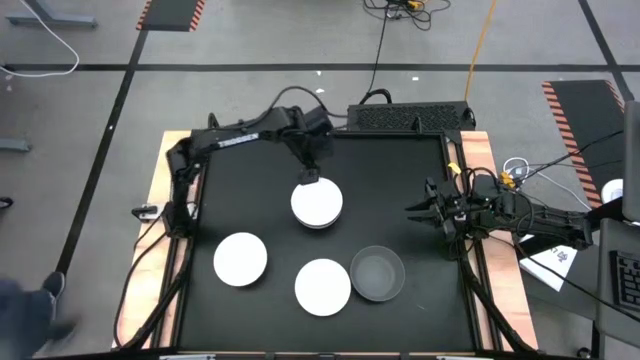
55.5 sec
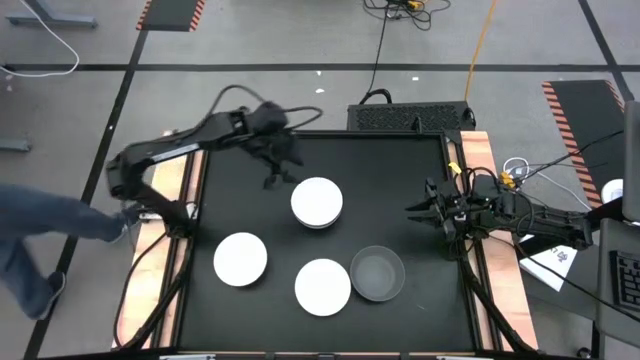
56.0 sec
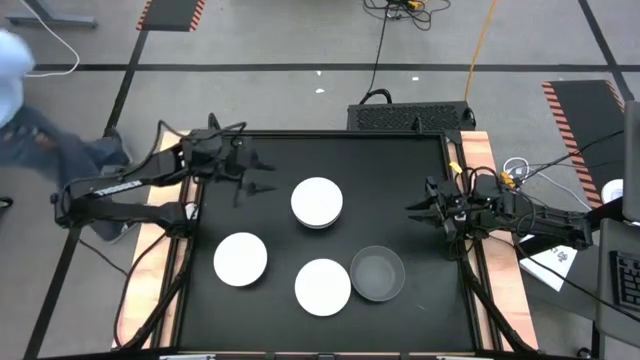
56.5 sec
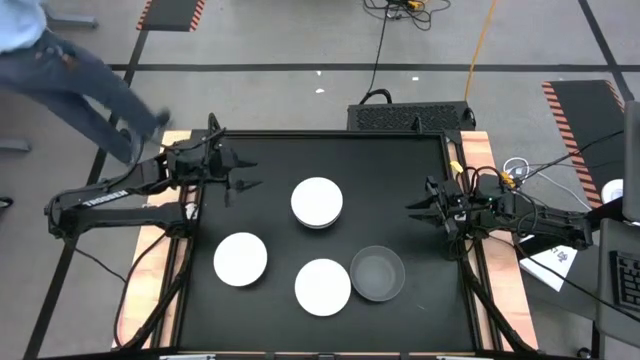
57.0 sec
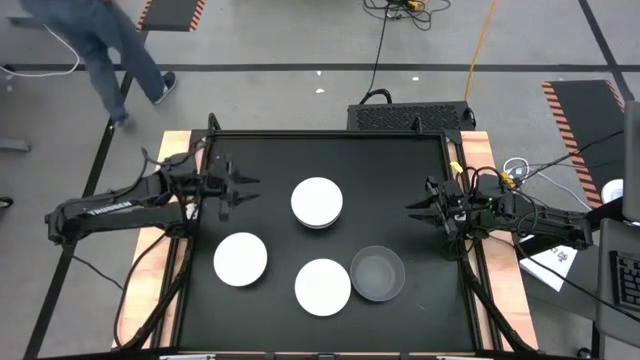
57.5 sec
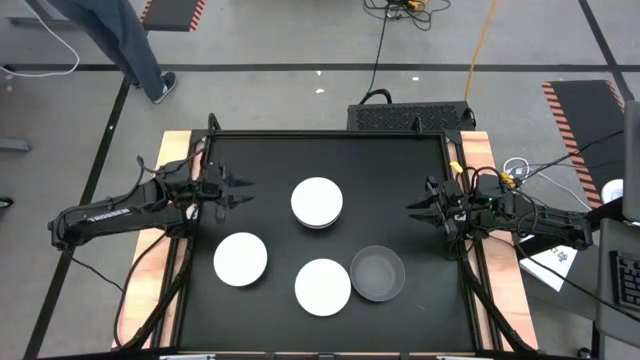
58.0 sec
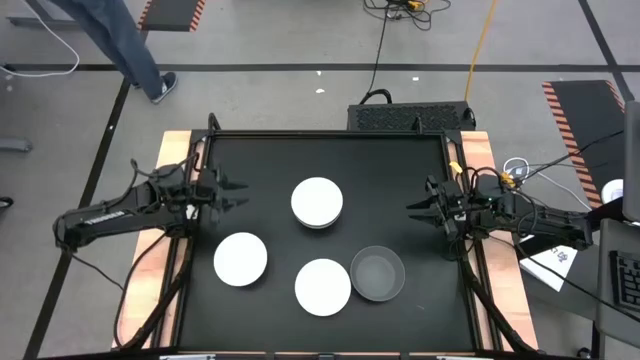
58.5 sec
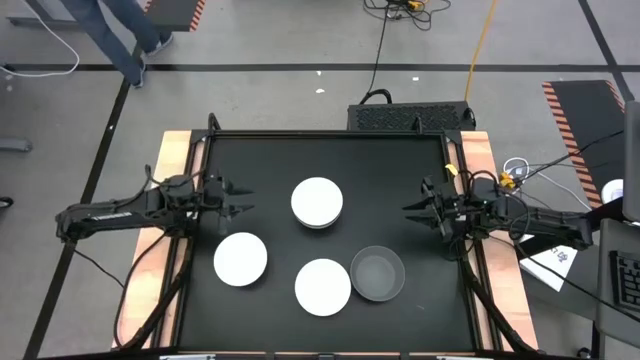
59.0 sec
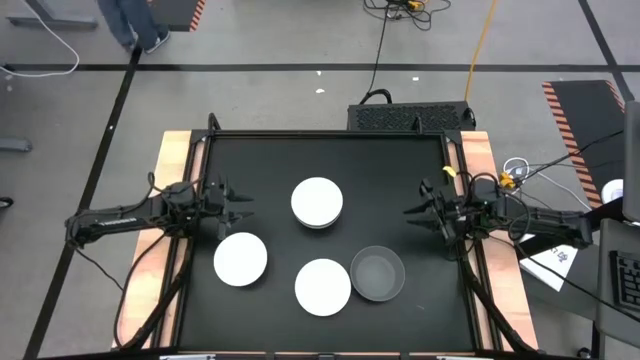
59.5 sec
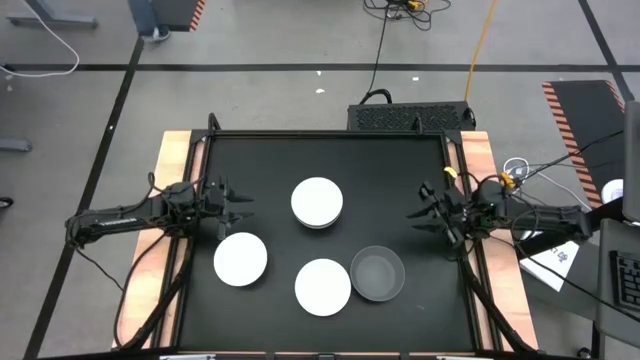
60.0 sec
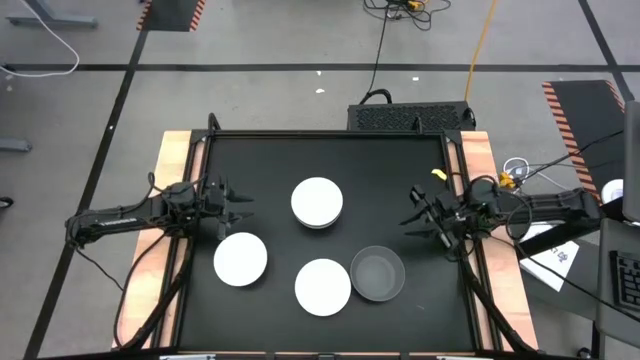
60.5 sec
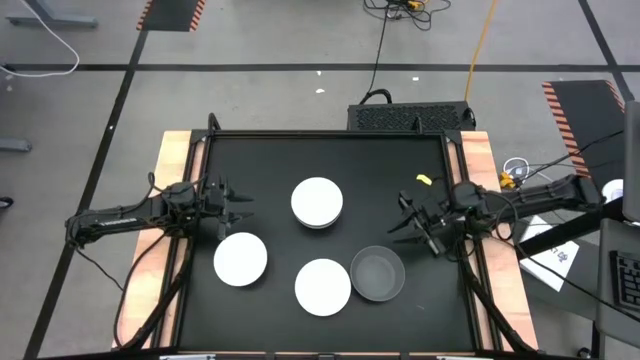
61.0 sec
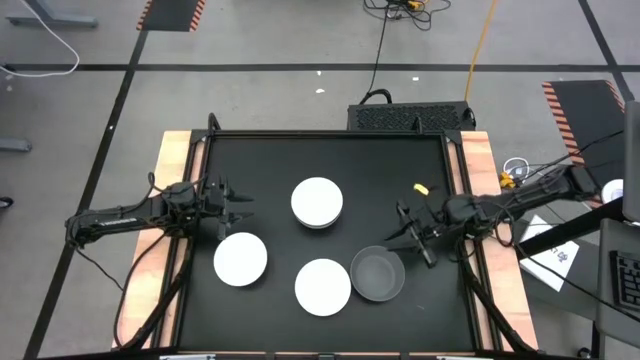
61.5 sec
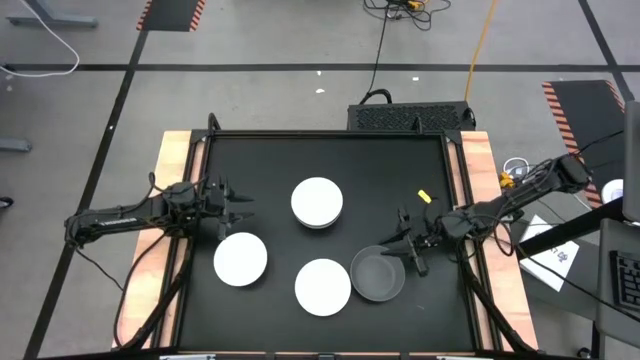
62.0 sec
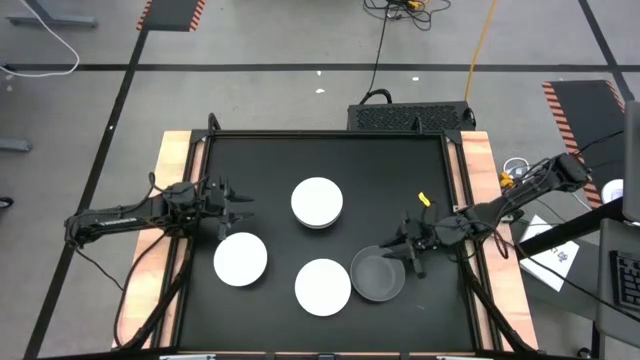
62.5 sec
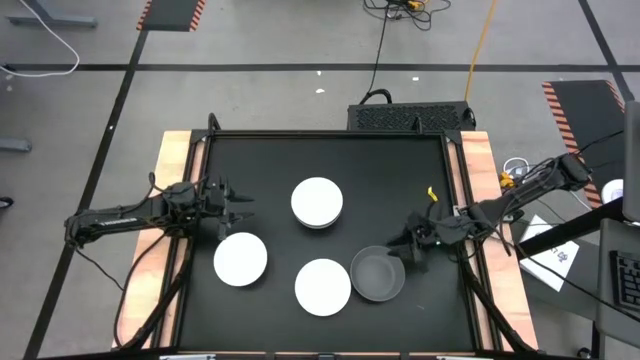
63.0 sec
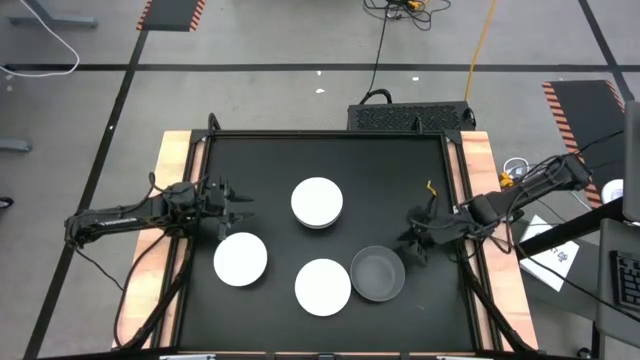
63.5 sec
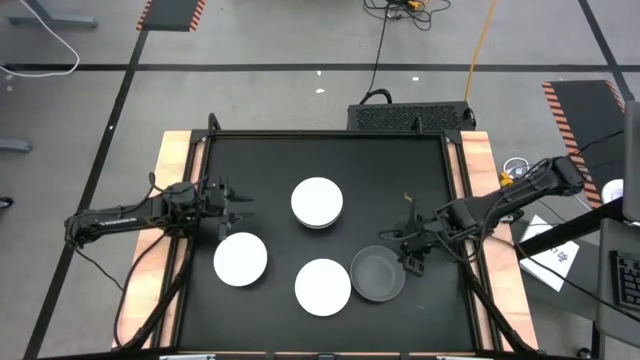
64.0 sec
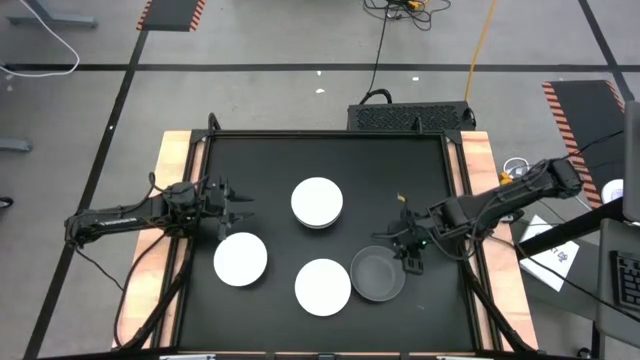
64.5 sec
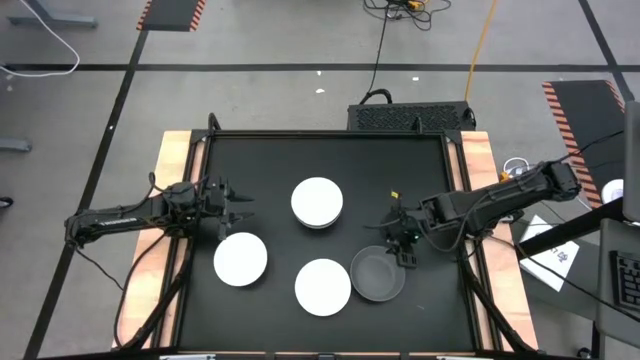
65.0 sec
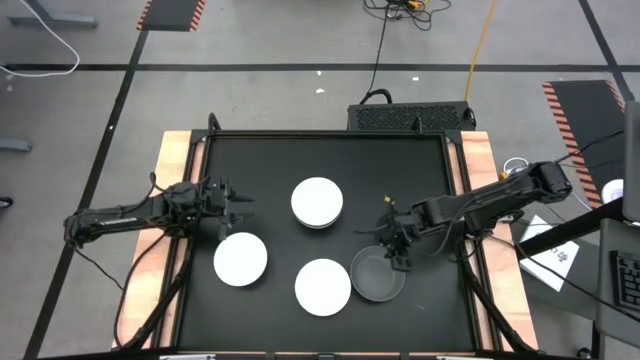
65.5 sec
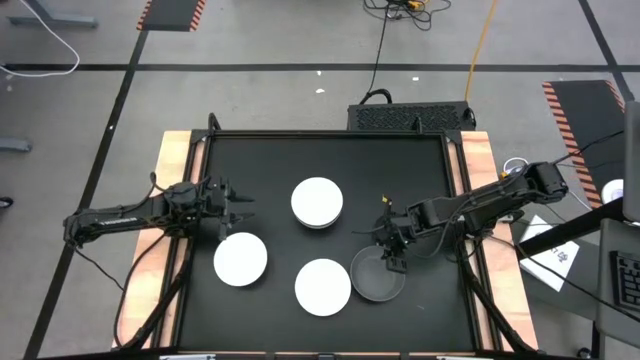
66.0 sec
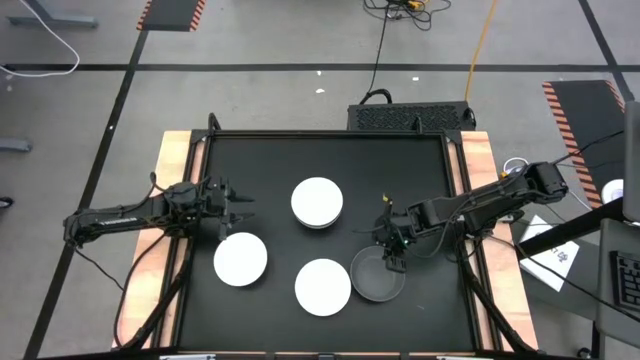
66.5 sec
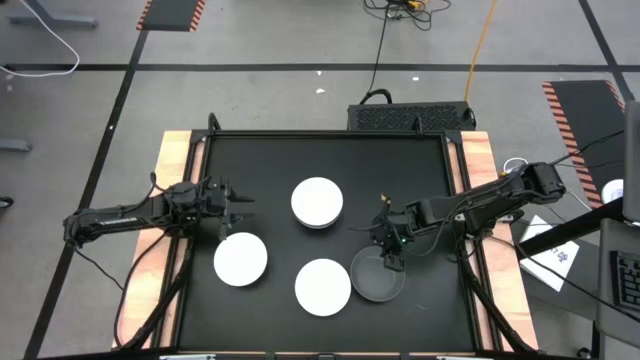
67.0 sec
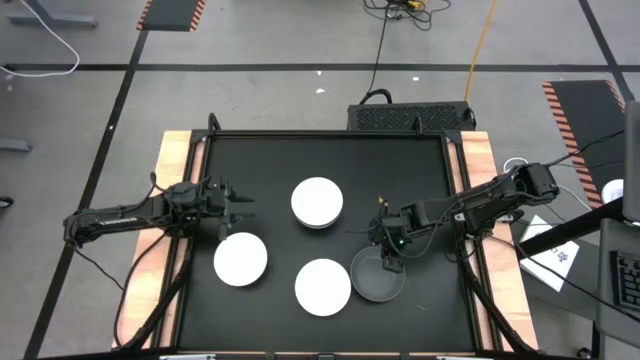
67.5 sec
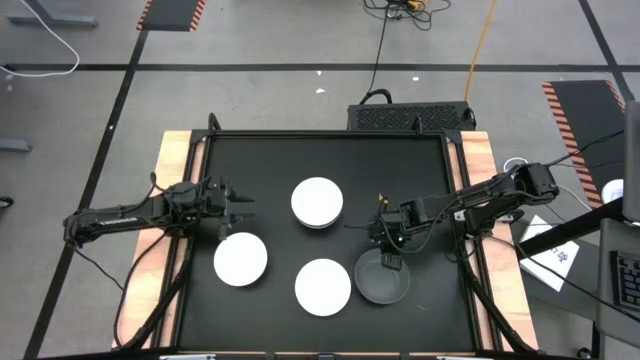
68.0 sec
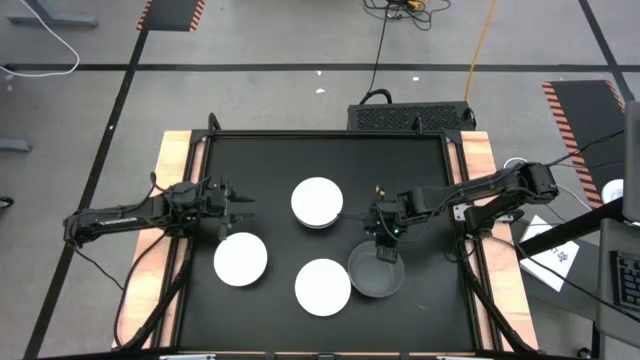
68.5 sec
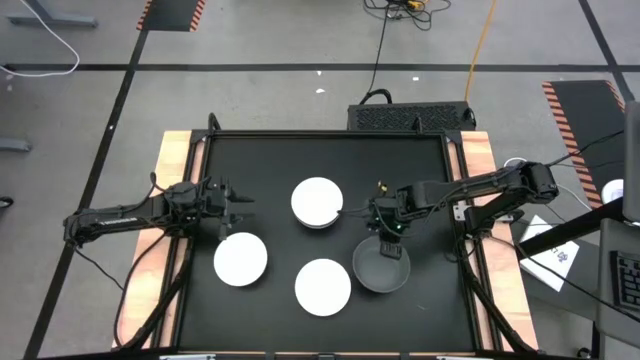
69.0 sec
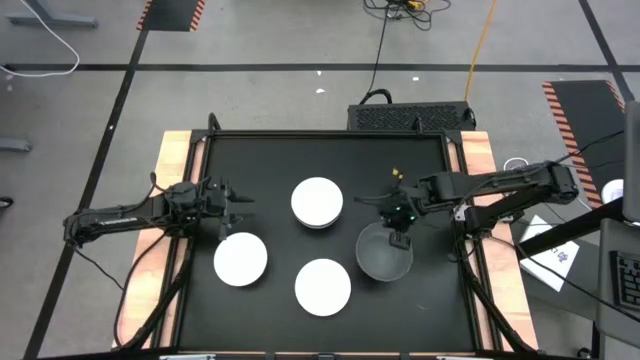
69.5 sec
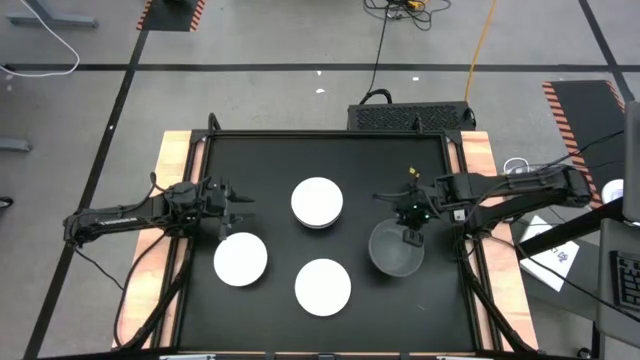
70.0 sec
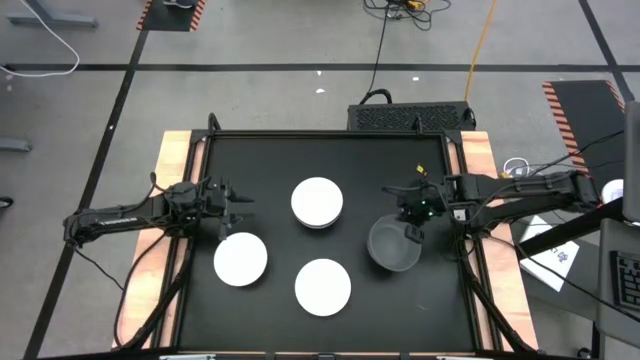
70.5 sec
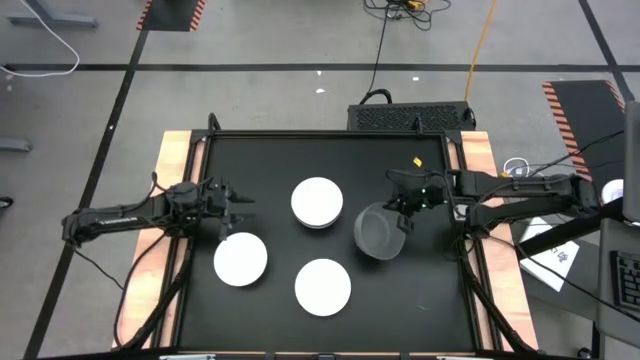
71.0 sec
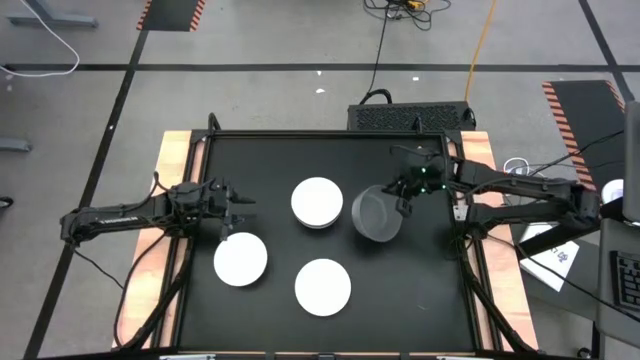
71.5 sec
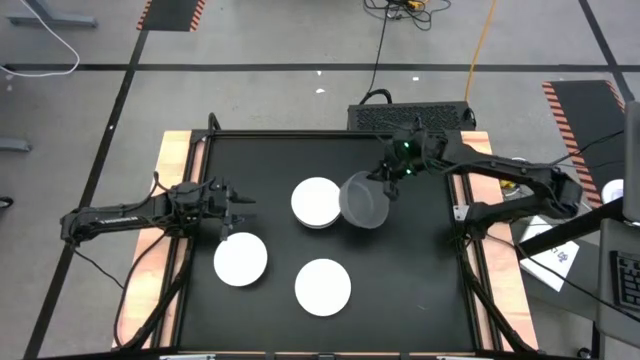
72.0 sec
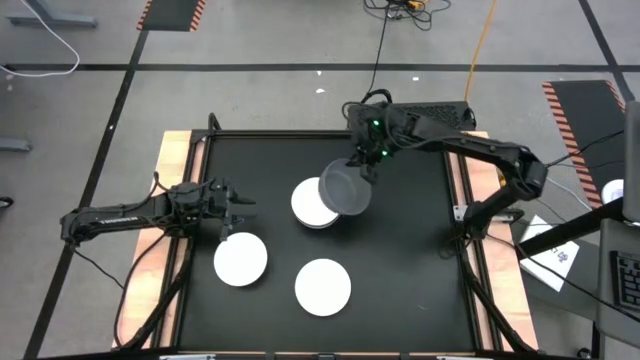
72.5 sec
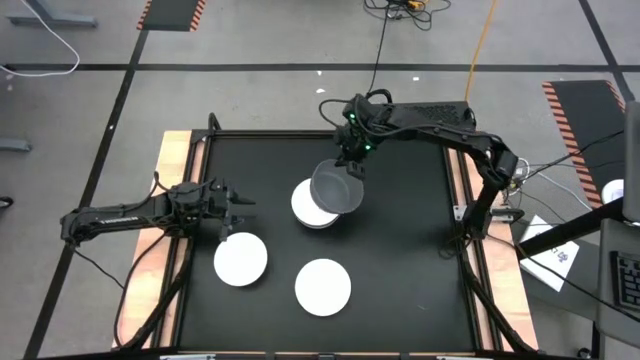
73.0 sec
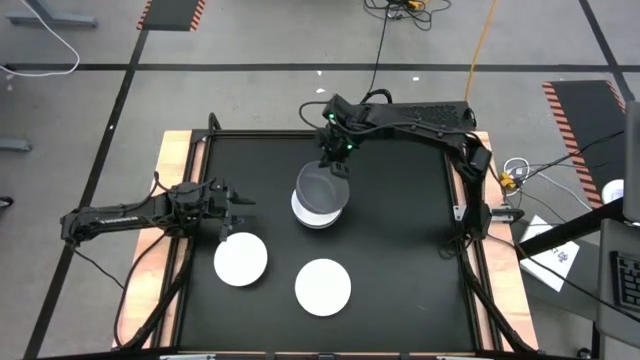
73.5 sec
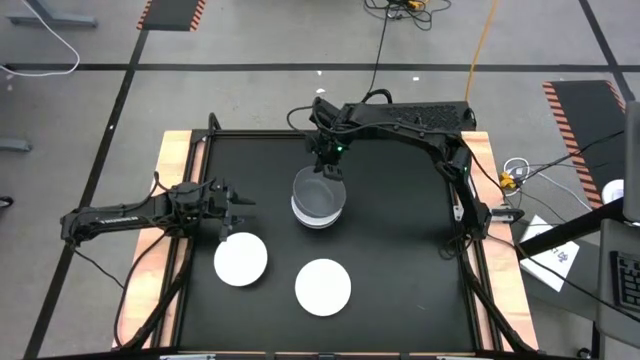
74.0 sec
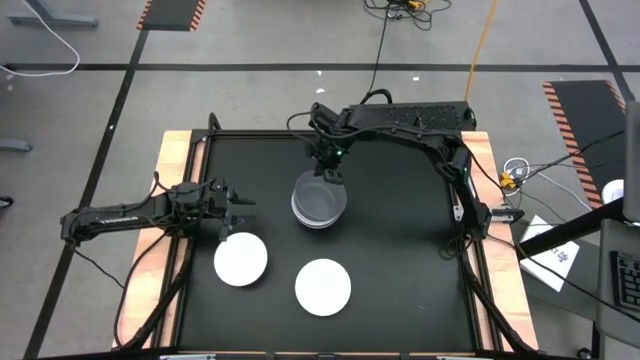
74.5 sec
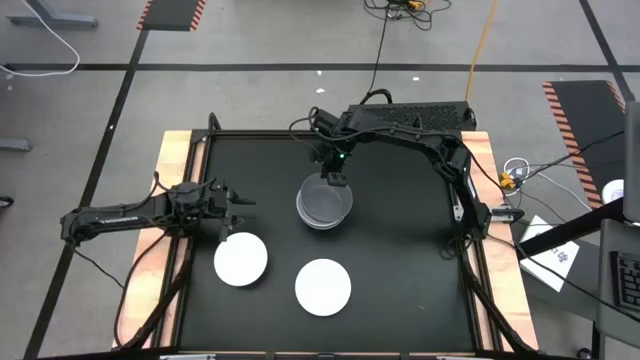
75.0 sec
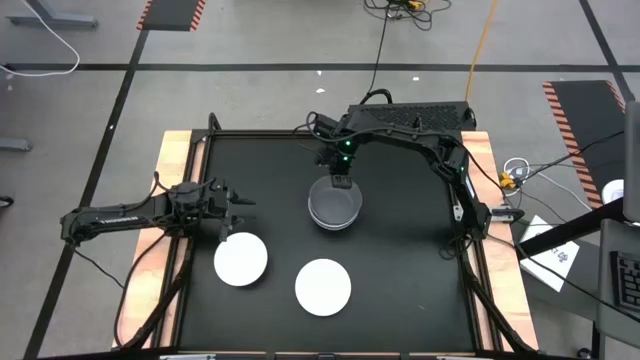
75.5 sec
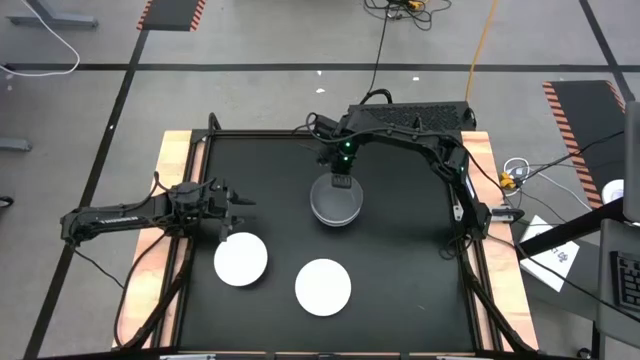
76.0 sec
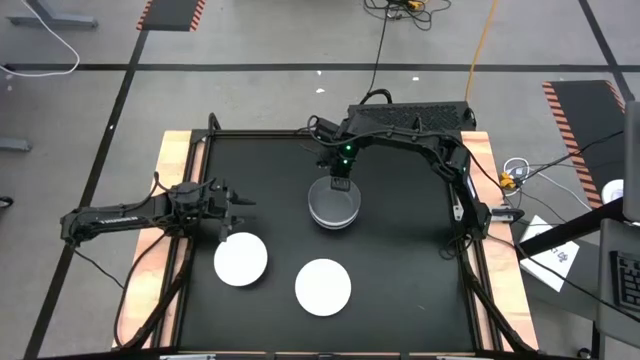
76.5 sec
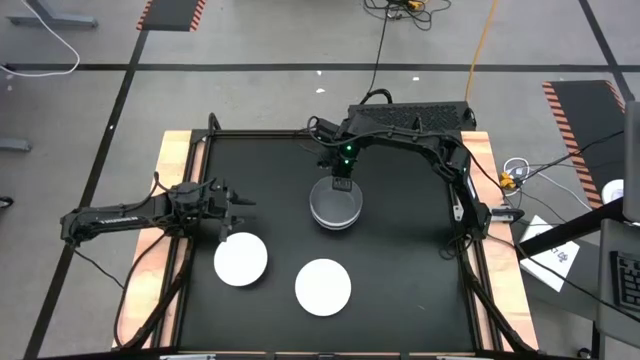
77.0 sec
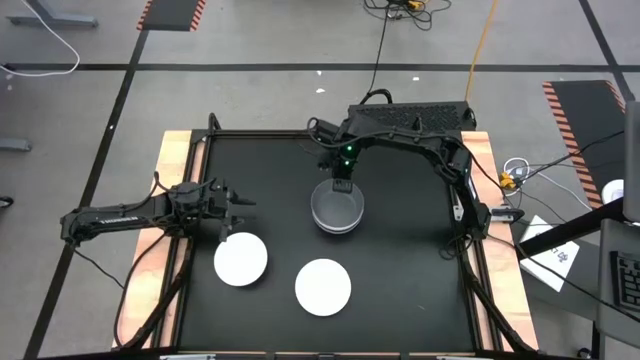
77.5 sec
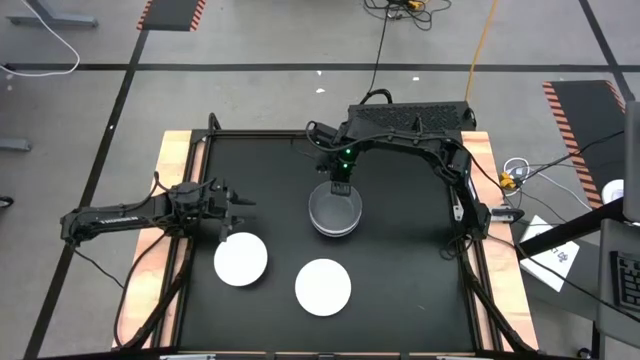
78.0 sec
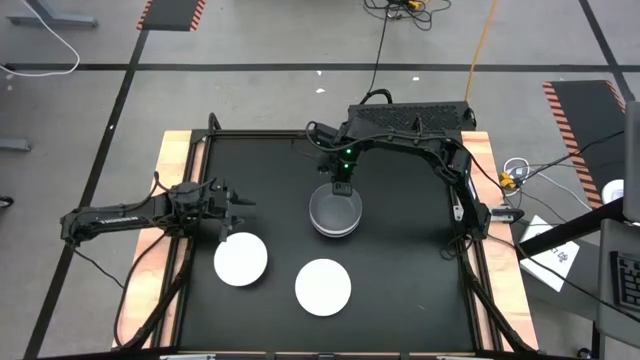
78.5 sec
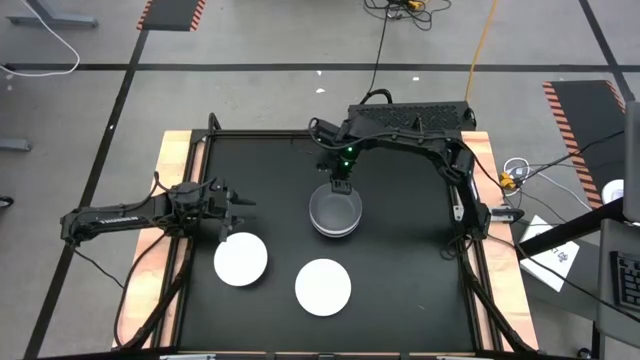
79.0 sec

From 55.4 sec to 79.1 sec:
Task: Nest bowls inside each other
Stack the dark gray bowl on top of the white bowl
